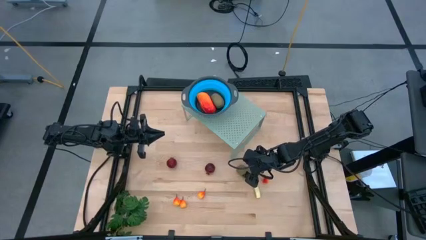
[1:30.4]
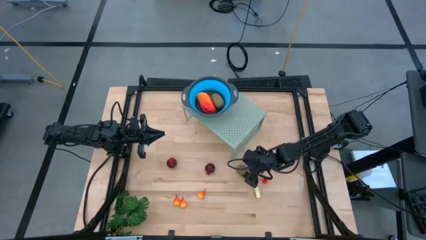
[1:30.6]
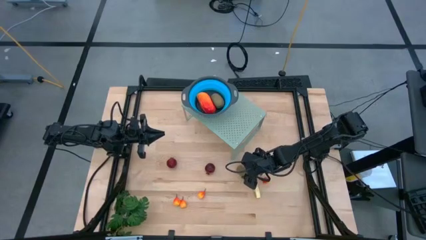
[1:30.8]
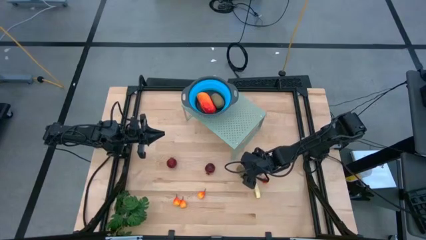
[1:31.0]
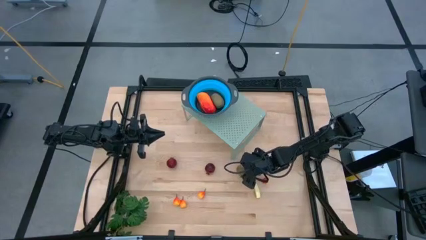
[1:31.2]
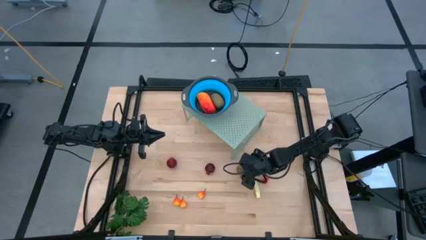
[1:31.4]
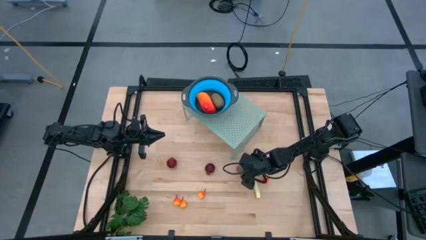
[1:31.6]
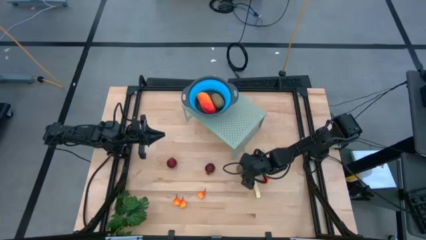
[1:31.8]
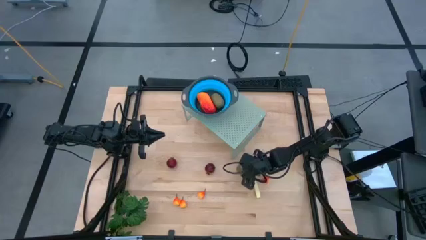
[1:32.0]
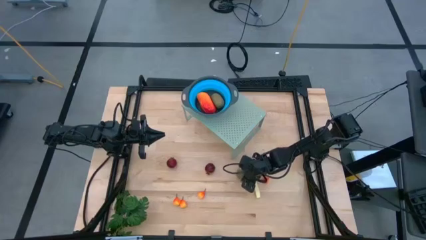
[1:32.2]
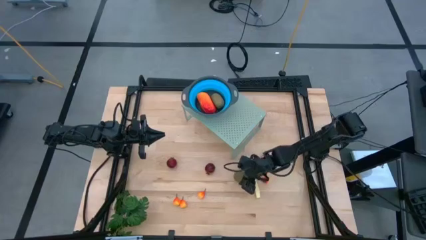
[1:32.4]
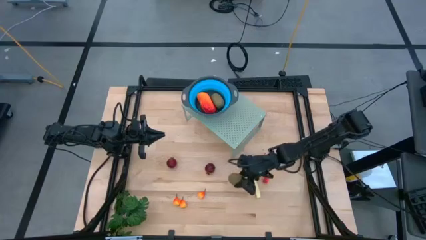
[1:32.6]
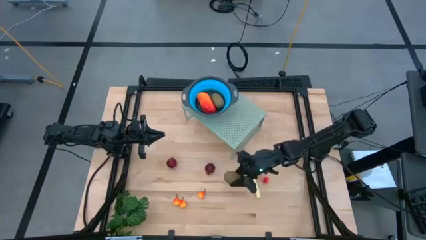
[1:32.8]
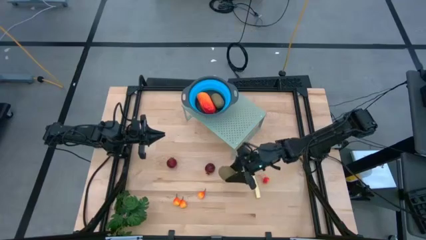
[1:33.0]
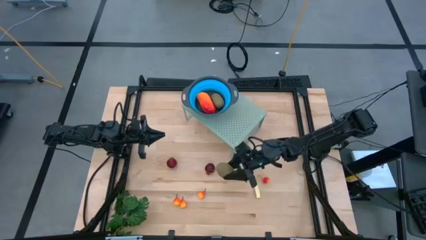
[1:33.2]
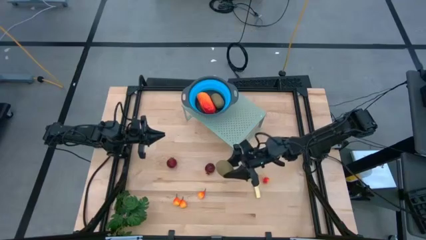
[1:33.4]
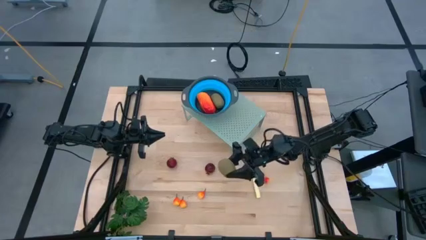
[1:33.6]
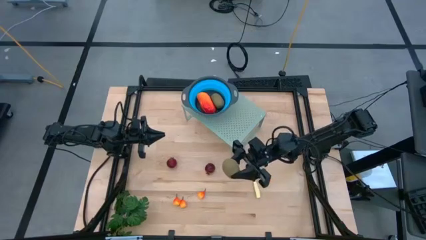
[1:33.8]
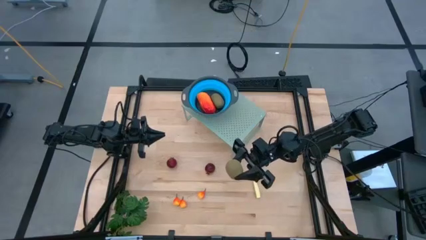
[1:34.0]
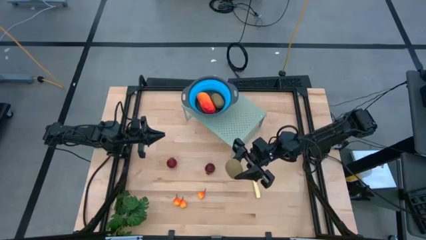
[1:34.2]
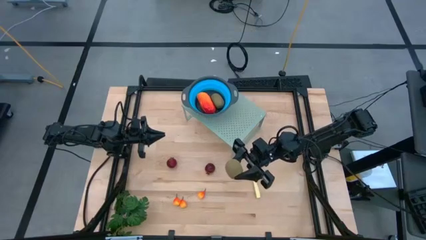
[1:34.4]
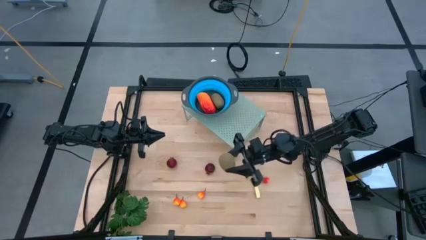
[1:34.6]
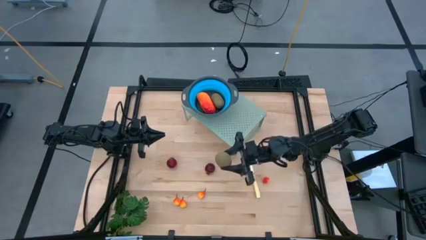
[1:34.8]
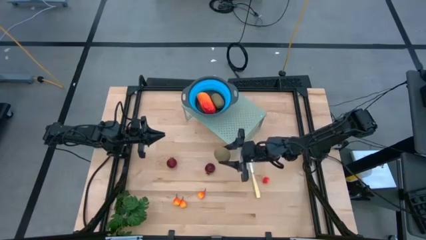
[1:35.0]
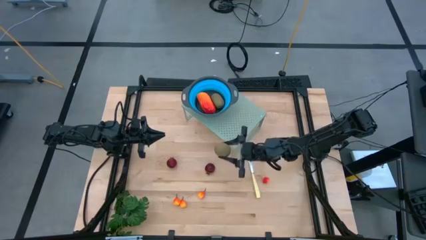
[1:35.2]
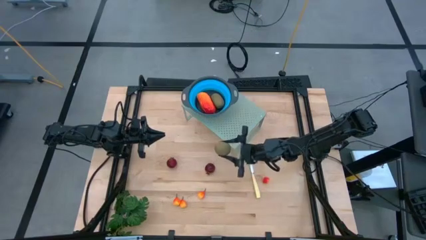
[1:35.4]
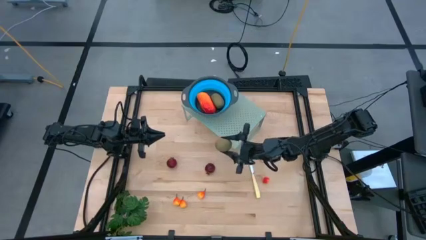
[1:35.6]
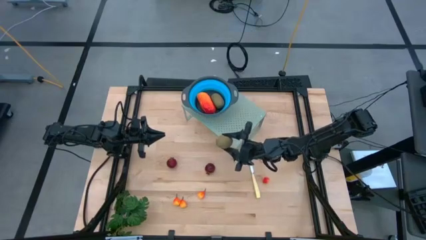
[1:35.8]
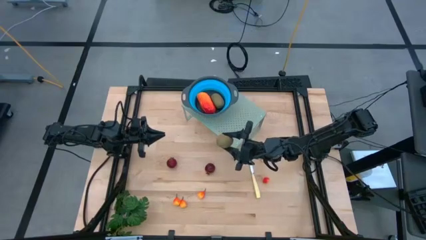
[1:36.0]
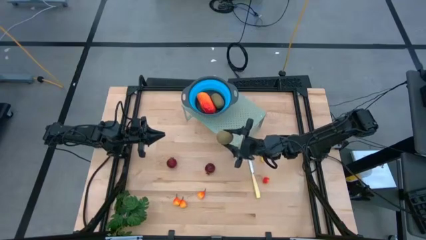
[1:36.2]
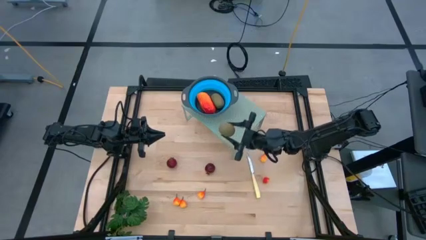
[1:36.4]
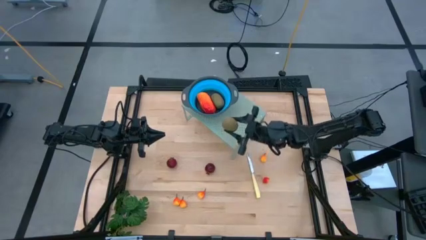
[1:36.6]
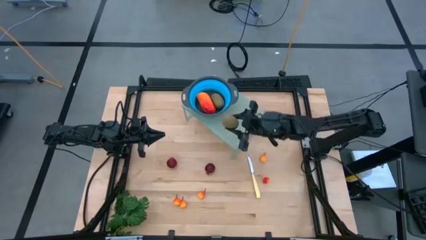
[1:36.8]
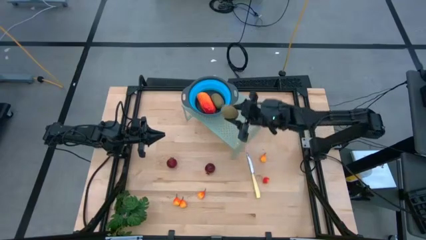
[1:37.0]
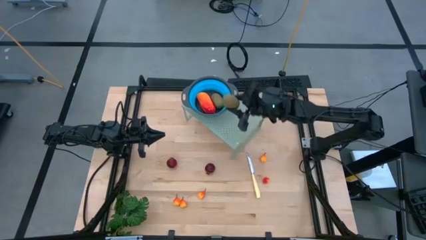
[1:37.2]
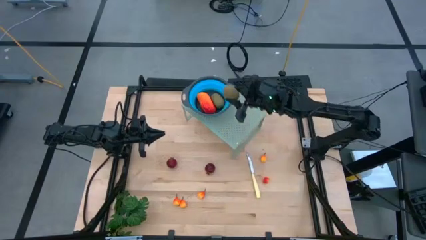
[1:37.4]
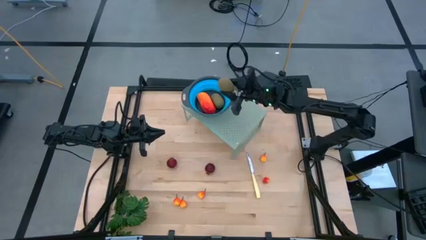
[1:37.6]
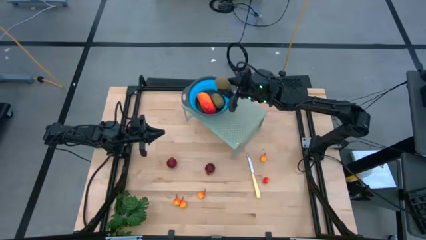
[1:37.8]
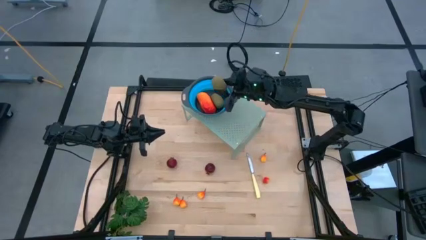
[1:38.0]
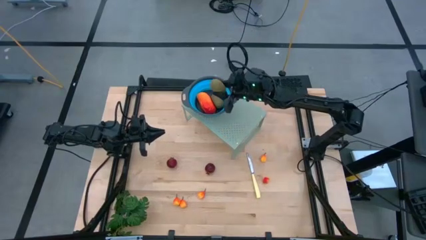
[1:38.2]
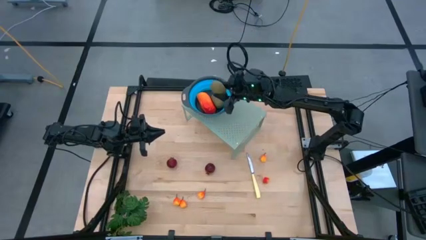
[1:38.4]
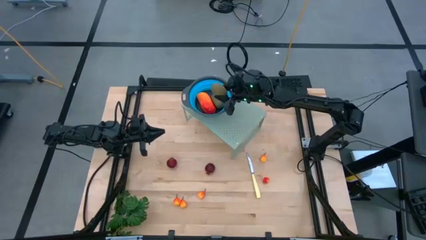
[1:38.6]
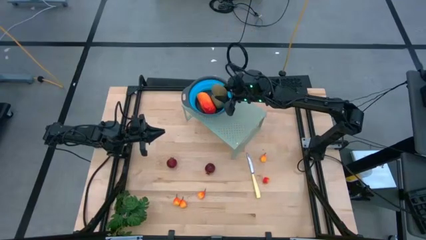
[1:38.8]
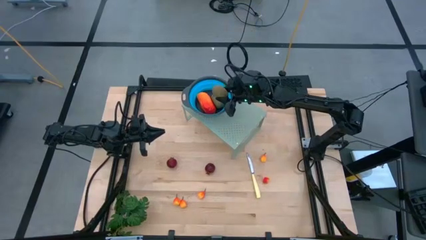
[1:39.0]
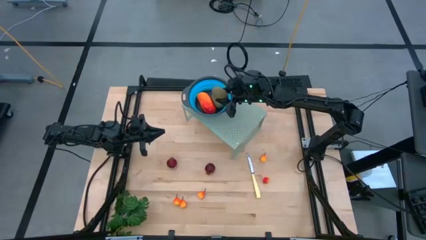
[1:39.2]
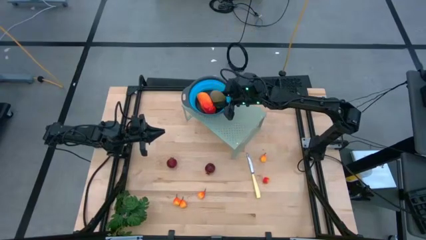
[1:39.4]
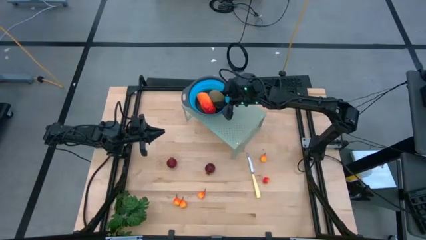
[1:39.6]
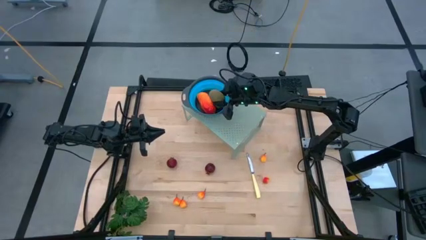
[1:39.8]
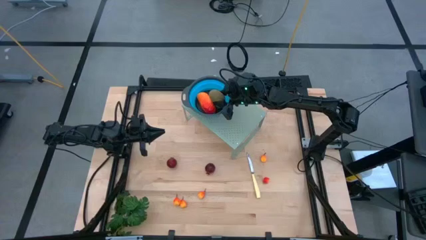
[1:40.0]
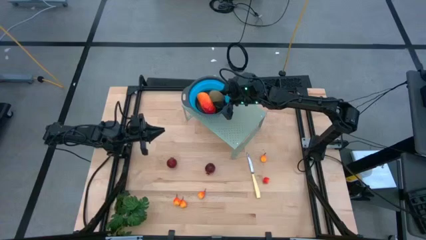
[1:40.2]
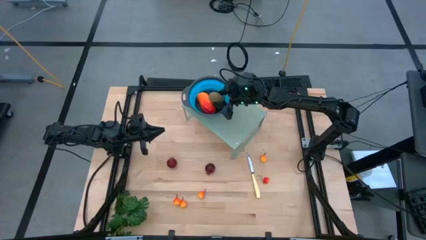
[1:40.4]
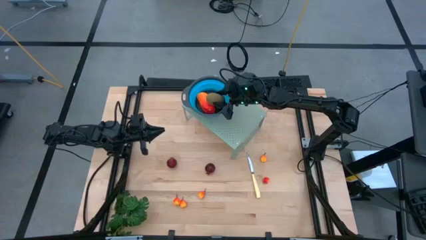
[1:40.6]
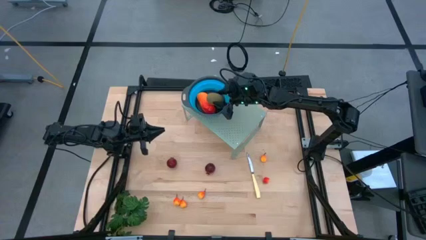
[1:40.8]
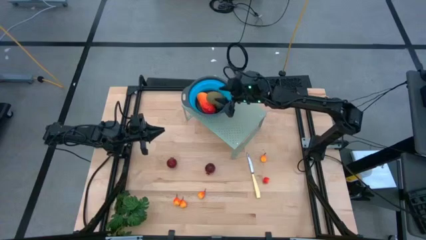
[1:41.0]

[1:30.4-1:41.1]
Task: Pick & Place Fruit
Put the kiwi into the blue strainer bowl on the shelf

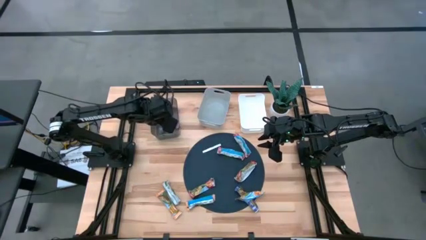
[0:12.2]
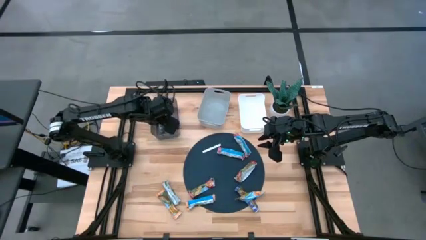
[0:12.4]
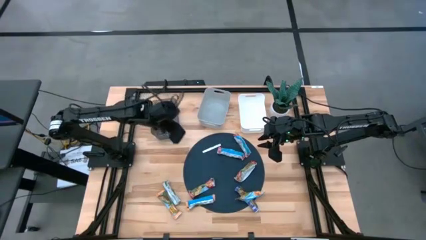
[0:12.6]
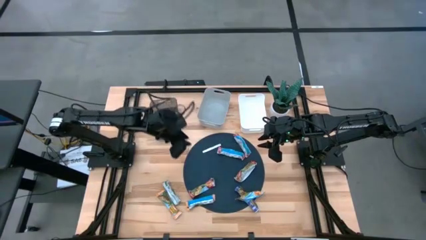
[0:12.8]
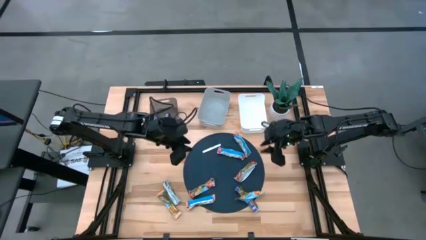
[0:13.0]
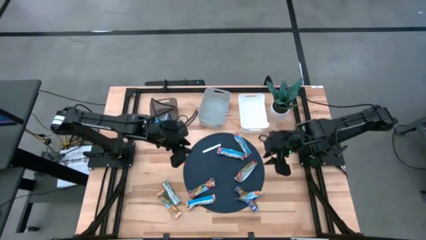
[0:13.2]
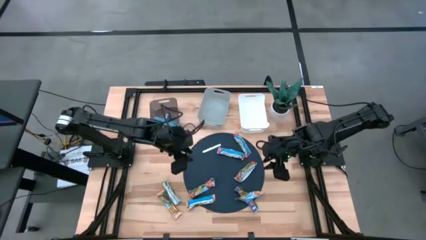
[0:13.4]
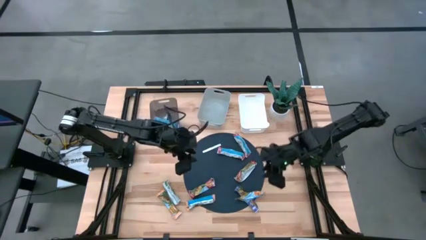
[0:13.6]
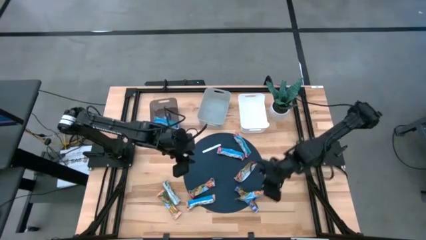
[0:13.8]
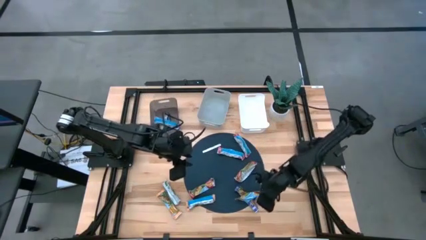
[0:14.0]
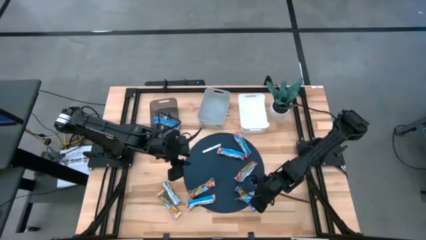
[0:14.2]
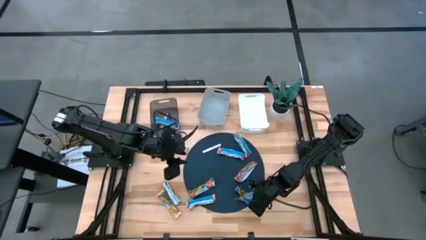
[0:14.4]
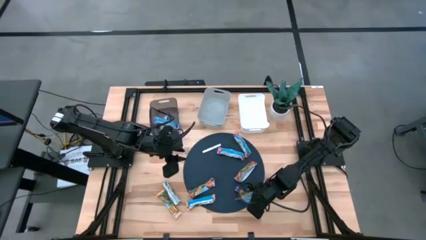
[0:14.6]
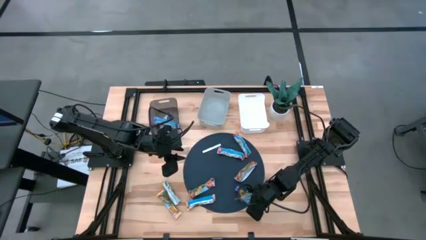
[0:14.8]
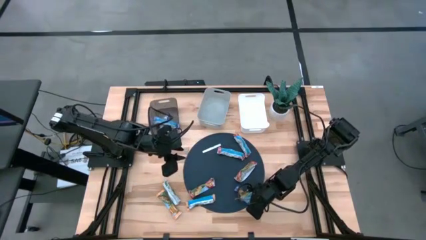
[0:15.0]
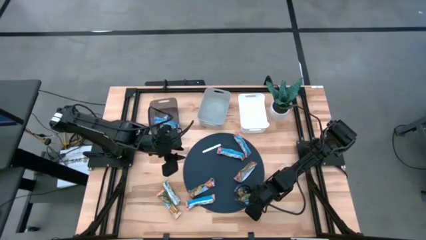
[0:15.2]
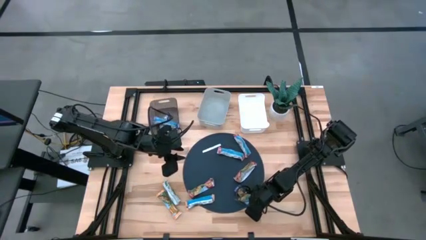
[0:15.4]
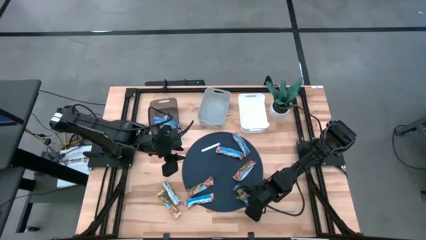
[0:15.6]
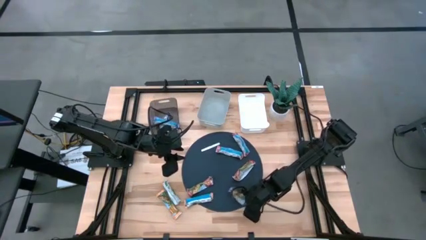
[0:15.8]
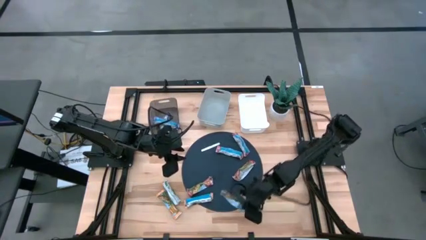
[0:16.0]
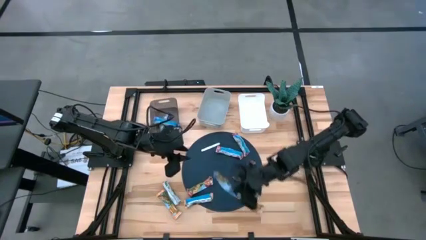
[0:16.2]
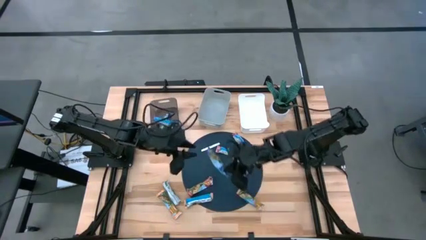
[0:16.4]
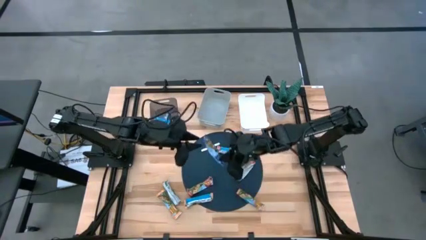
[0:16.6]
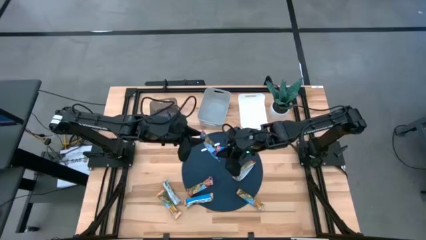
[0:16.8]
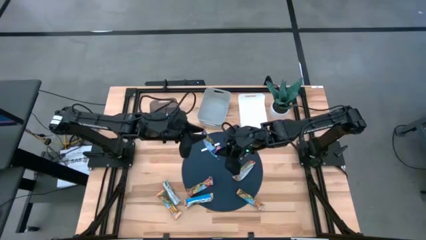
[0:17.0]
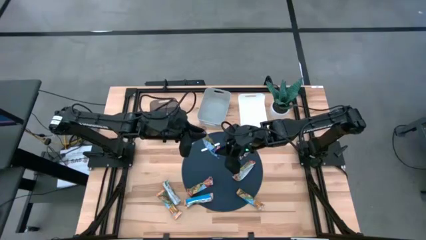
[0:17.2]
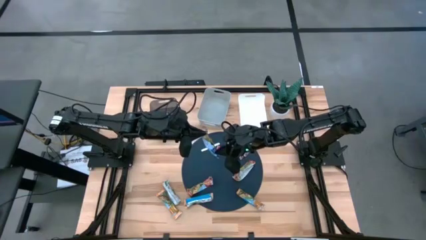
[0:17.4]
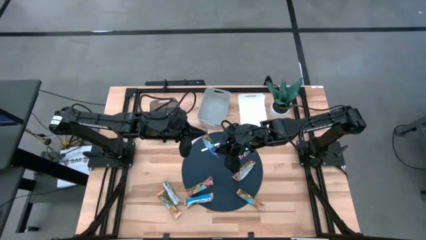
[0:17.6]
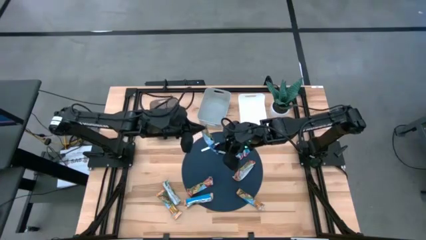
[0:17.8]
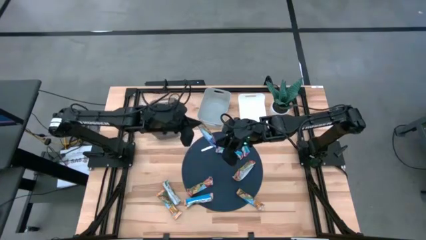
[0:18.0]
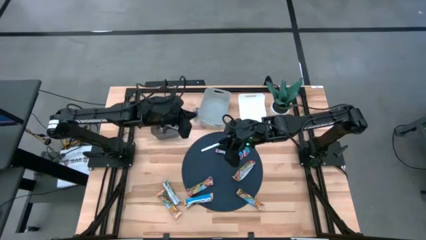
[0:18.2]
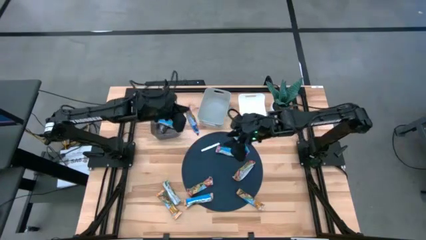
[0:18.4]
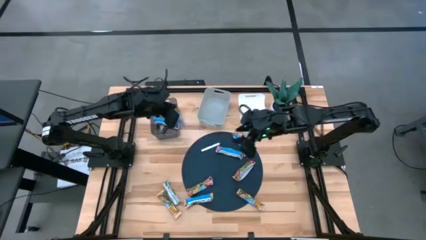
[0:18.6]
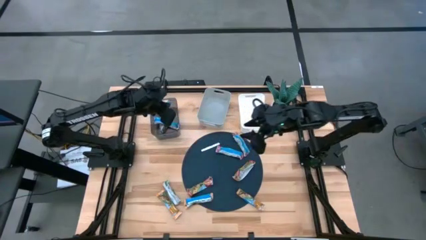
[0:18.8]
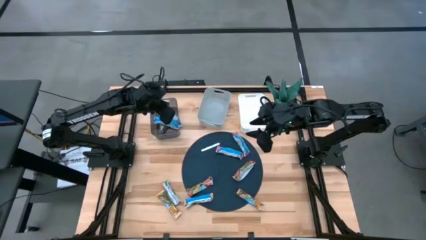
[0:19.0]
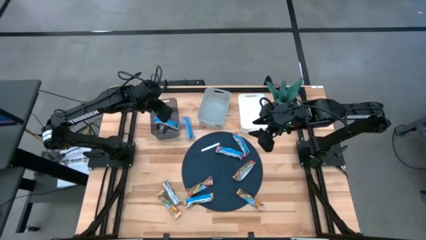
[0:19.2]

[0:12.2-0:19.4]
Task: Pick and place Granola Bars by type
Put the blue granola bar into the black bin
